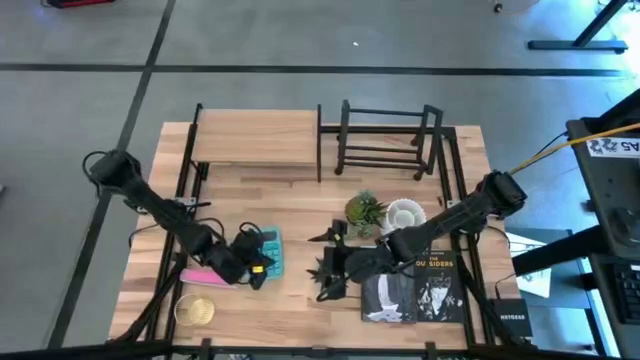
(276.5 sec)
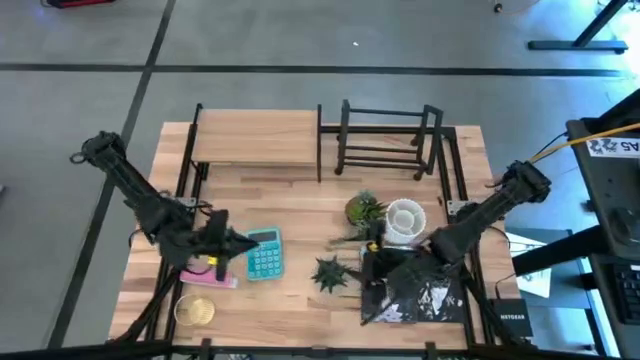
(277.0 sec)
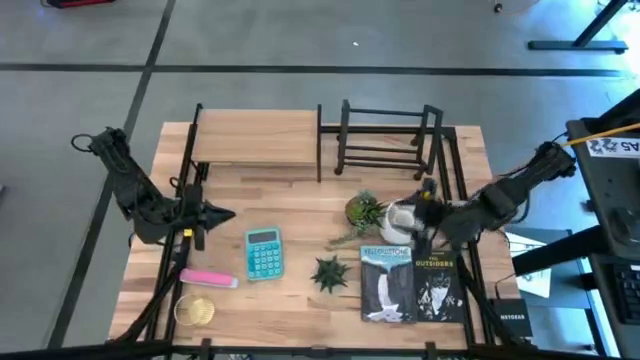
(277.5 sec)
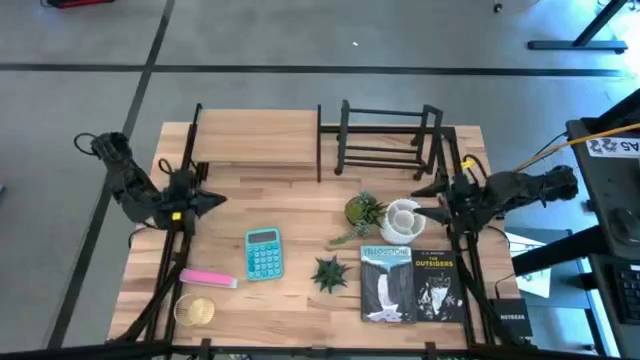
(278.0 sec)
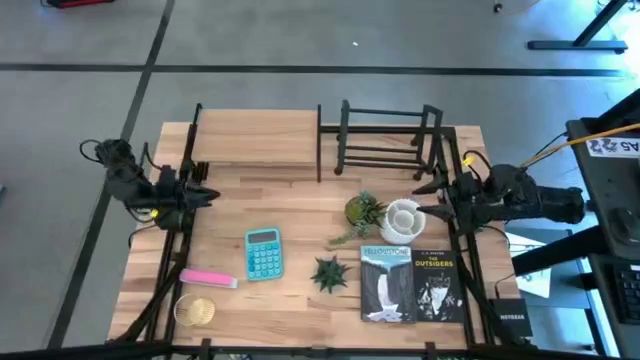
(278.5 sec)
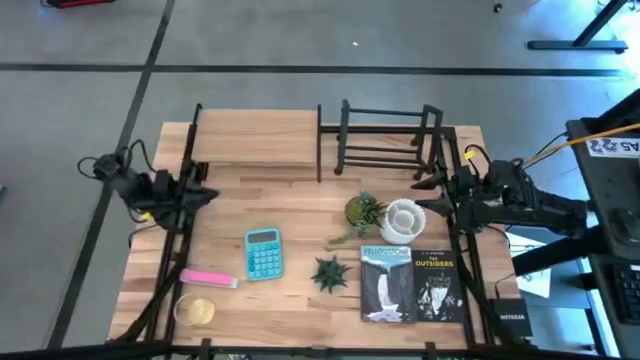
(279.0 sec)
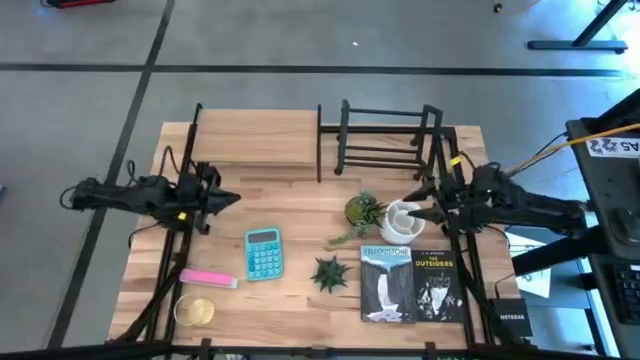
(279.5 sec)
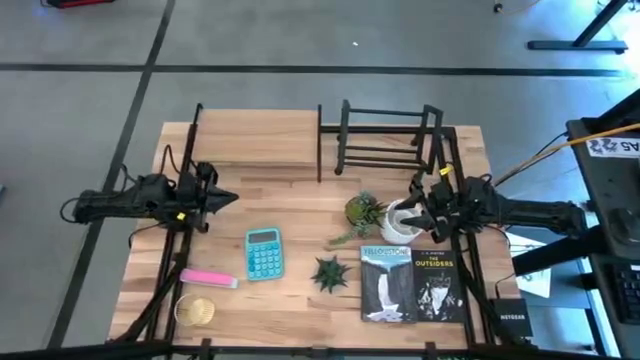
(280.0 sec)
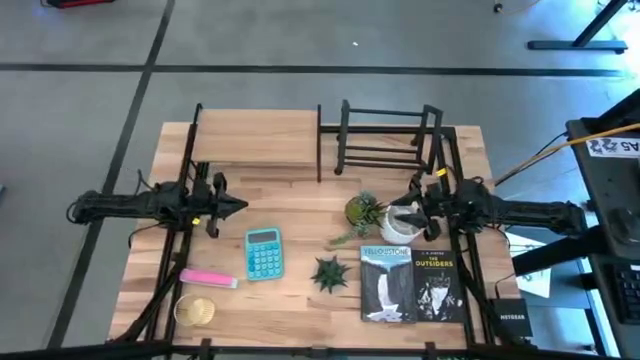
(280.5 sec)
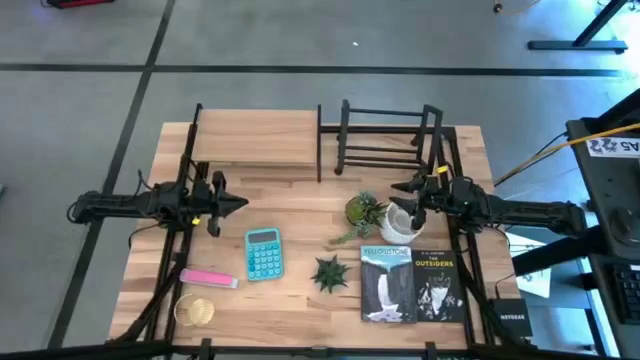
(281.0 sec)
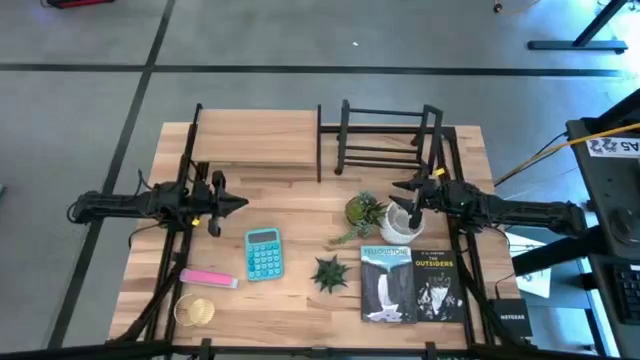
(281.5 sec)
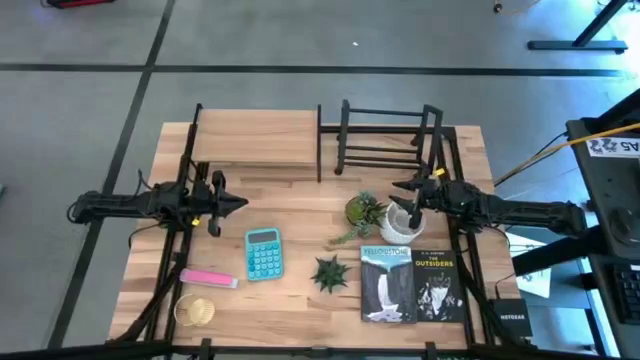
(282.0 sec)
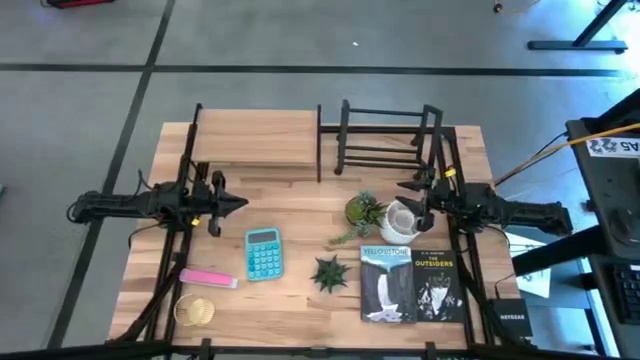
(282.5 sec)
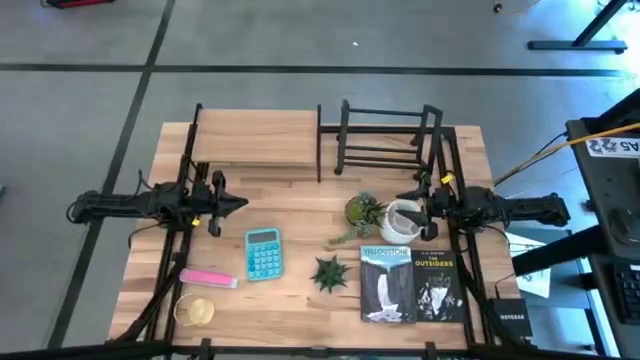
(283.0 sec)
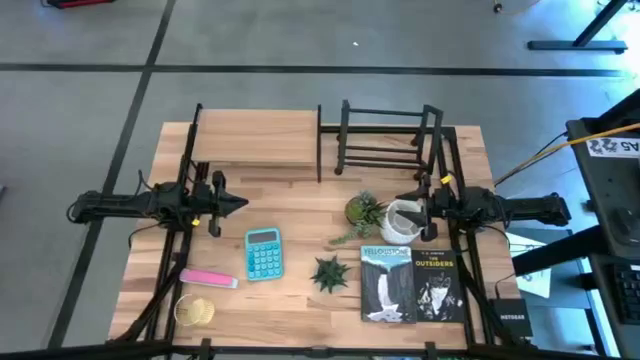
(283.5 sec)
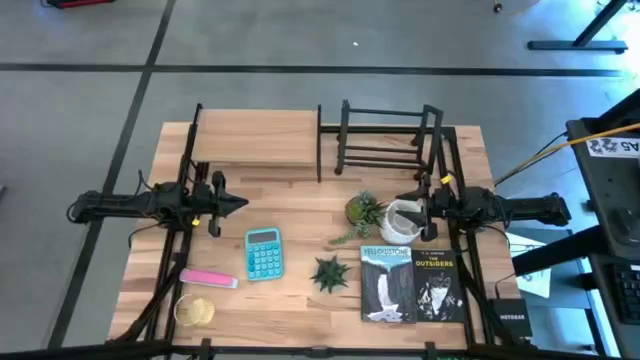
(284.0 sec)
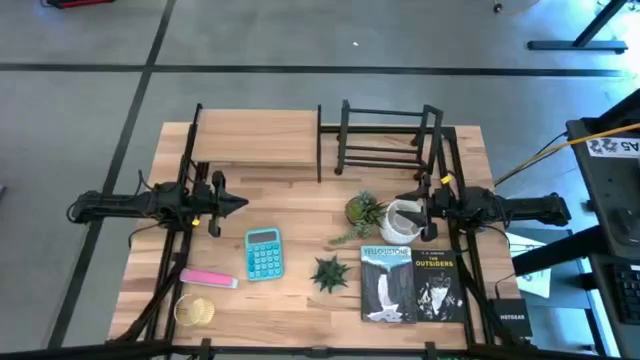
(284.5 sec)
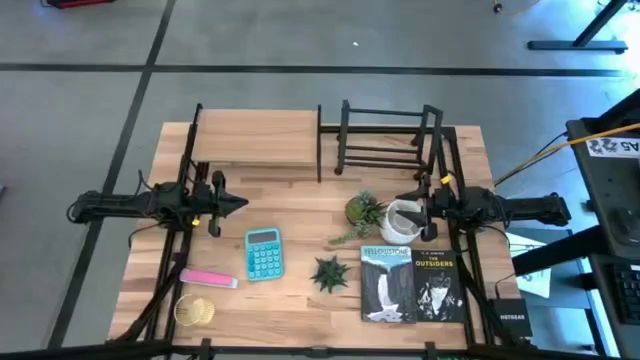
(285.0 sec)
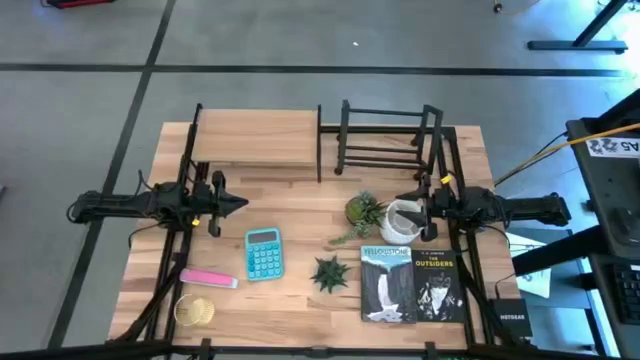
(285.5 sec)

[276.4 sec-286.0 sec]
Task: Stock shelves
Return to Home Position

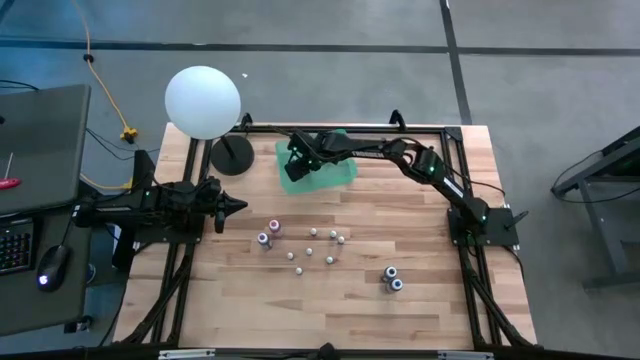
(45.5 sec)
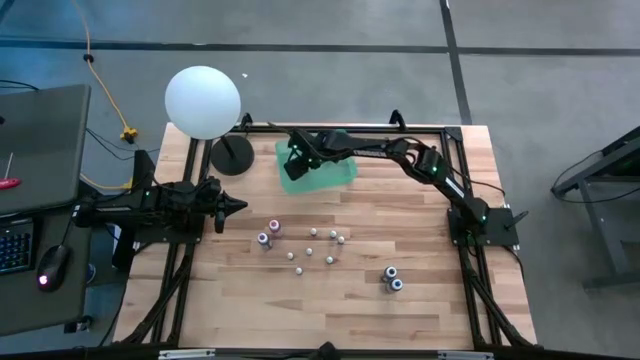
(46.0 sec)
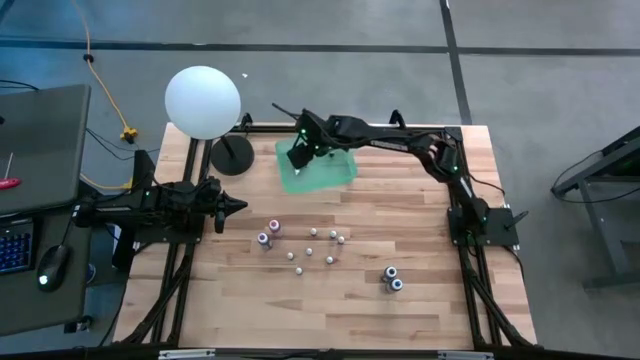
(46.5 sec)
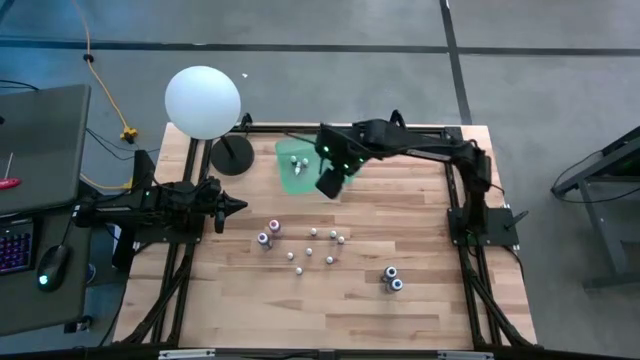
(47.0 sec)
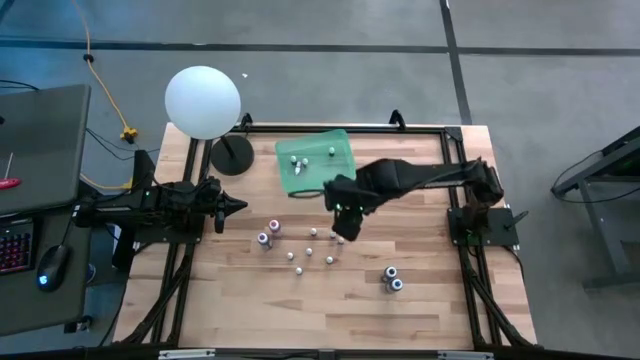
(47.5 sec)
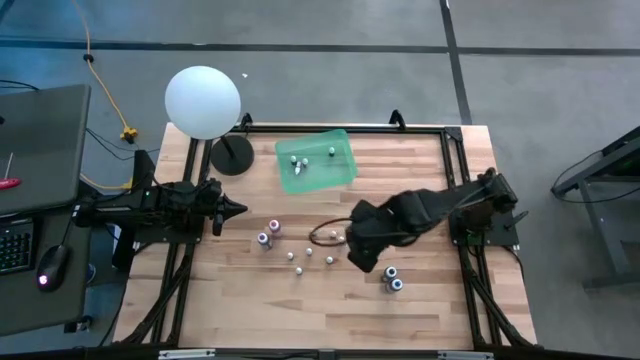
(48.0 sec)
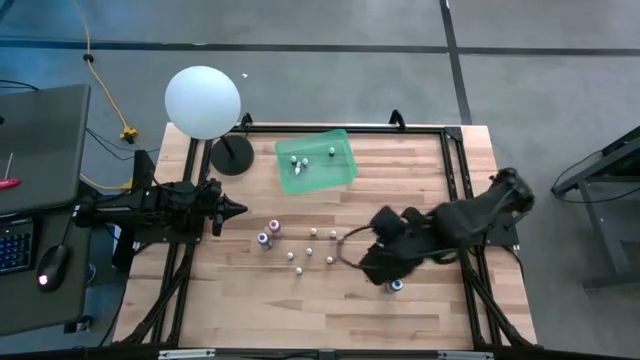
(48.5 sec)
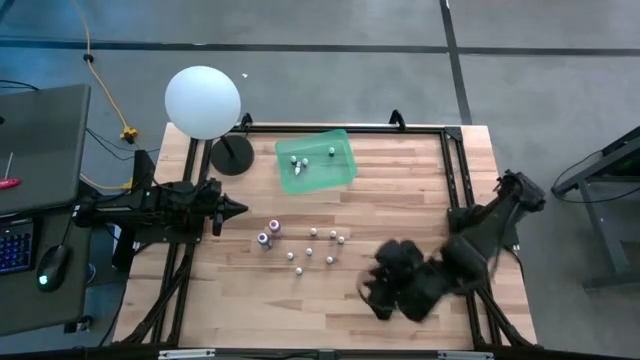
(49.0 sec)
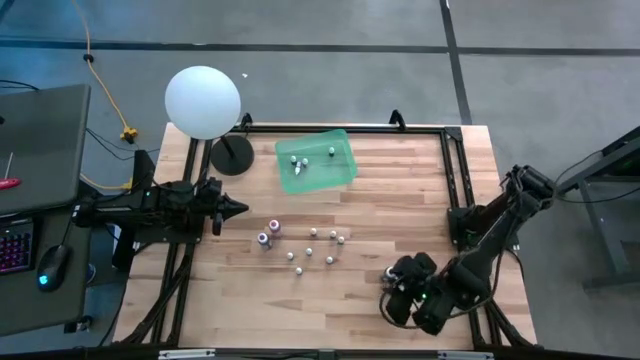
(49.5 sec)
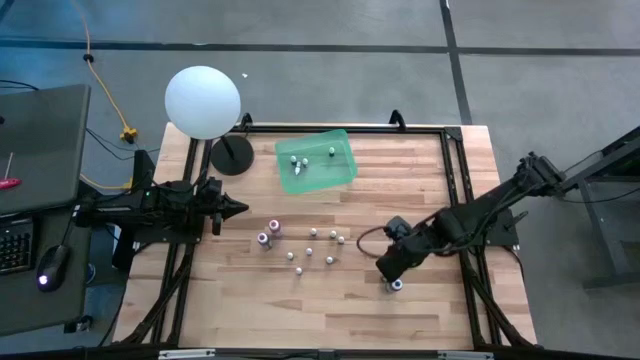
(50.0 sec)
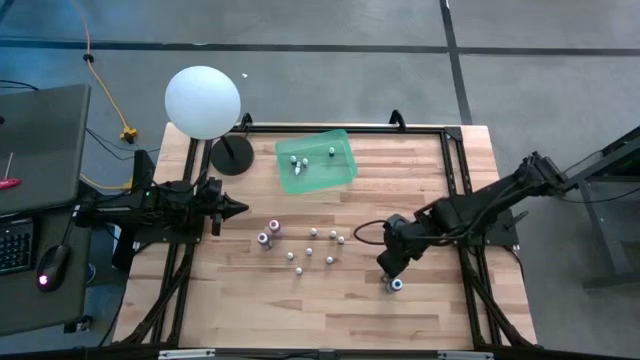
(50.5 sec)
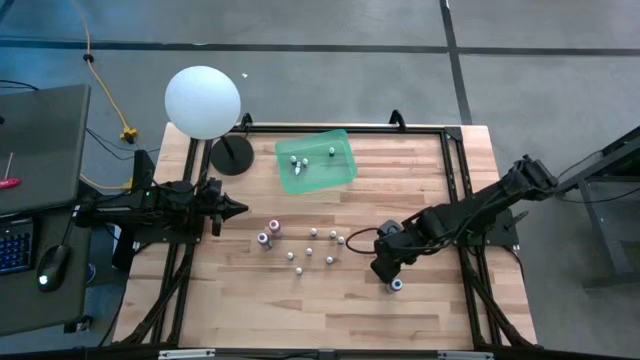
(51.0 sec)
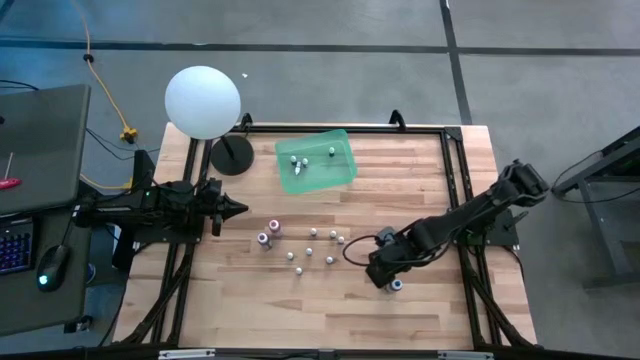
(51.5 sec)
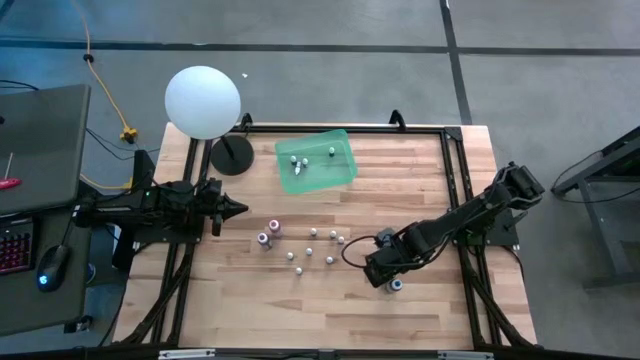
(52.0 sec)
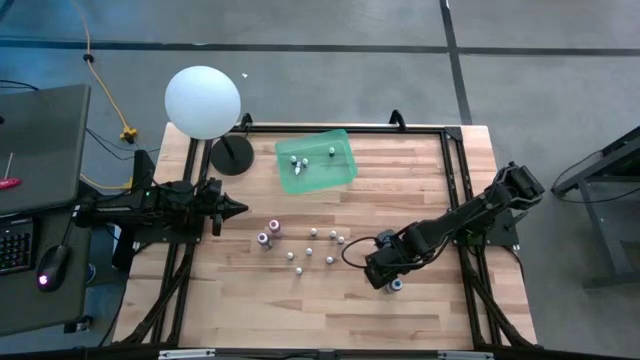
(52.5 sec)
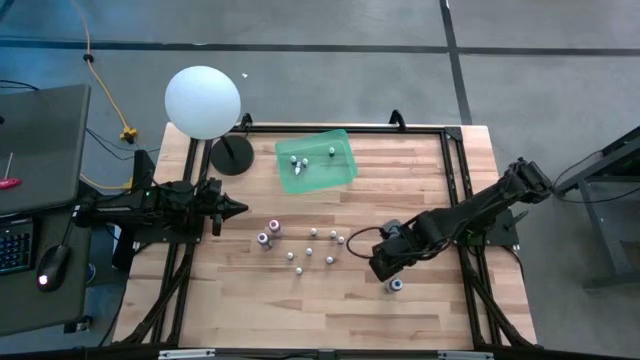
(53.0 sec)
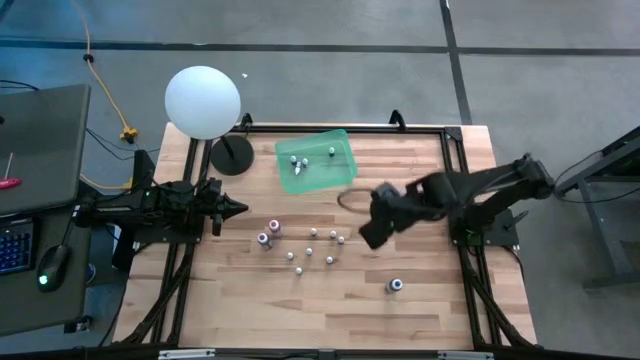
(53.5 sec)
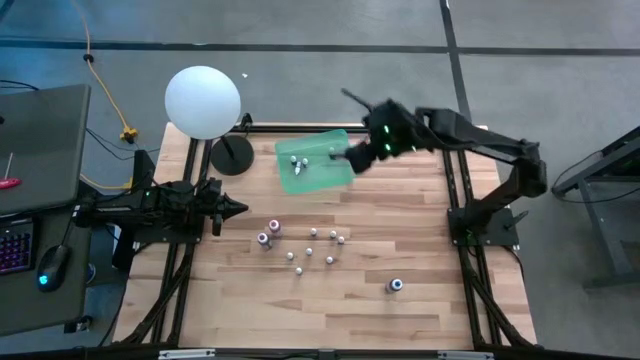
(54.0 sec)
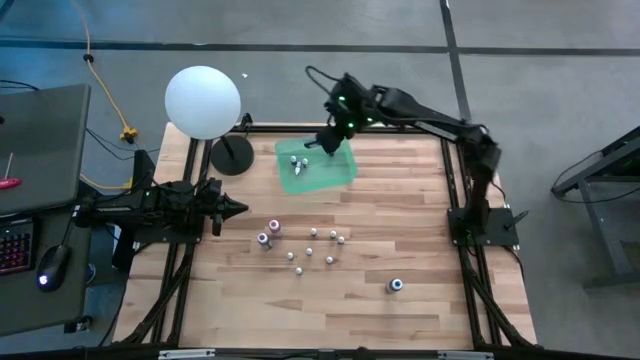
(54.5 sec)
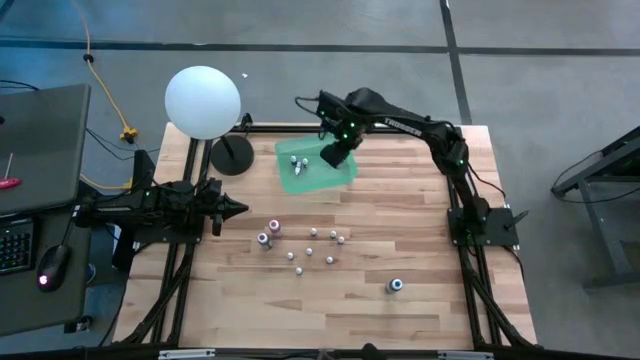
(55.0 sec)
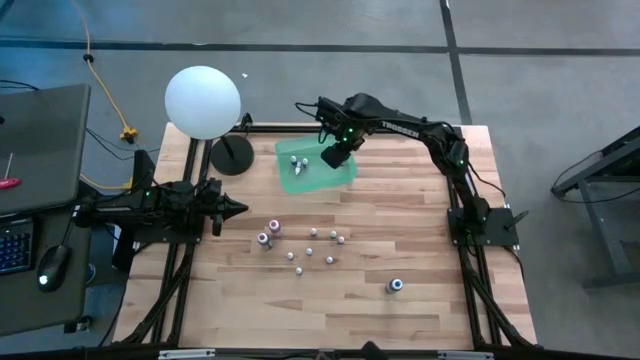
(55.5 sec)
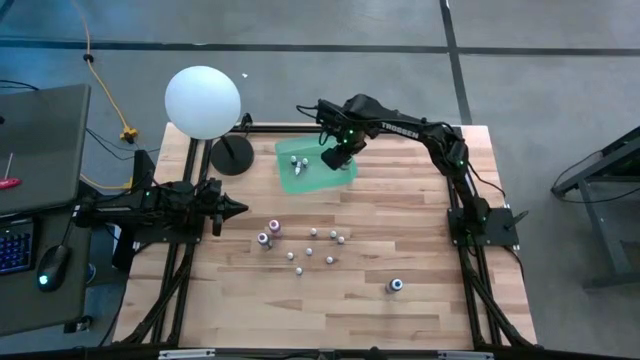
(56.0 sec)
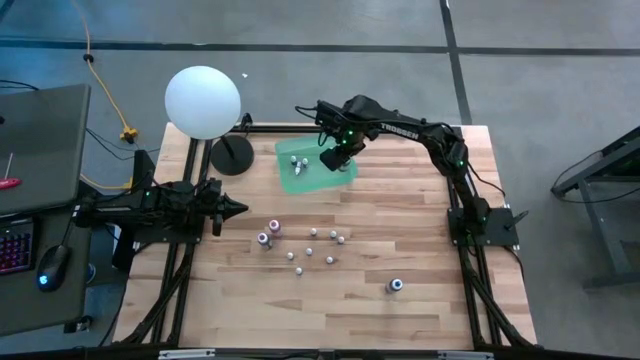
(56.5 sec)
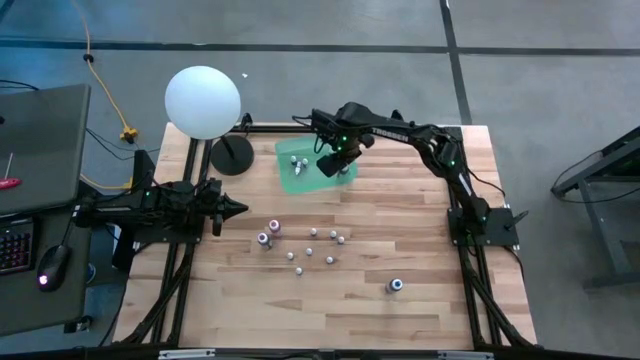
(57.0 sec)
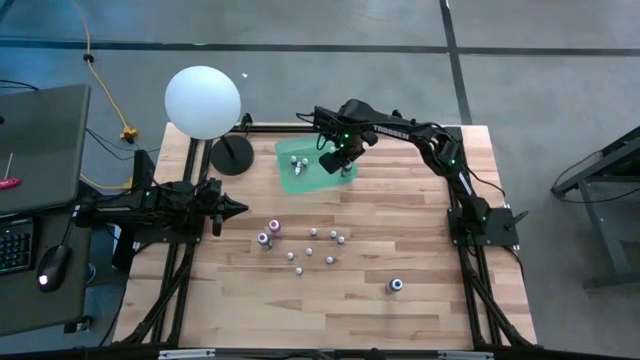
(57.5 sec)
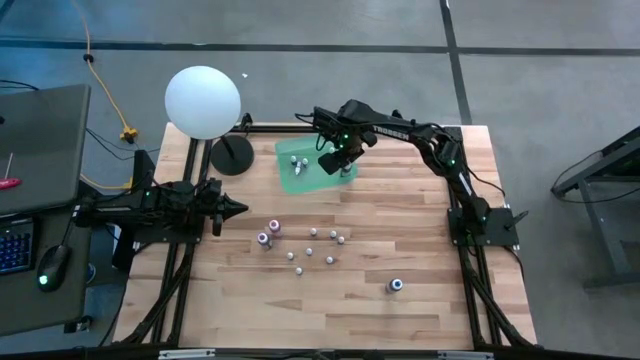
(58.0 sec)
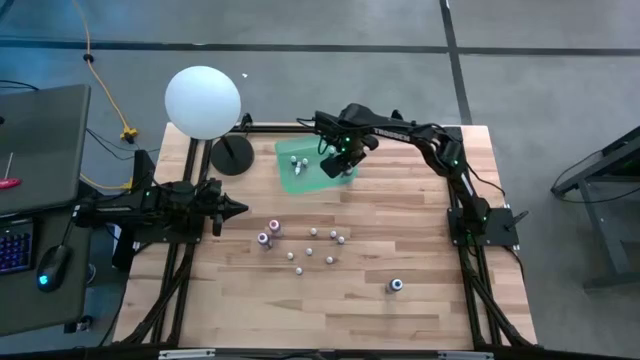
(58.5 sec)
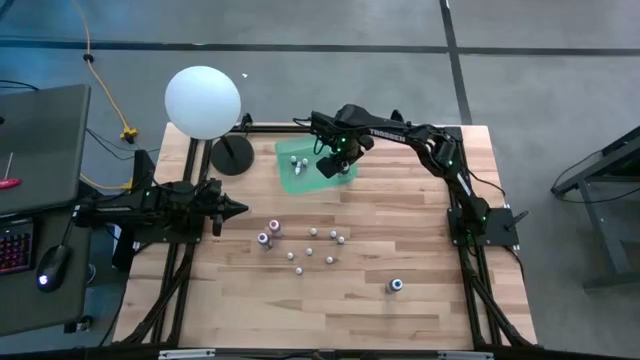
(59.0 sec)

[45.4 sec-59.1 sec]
Task: Pick & Place food coloring
Put the large black dye bottles in the green bin
